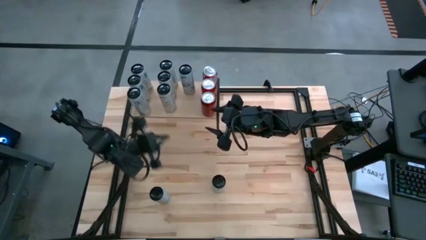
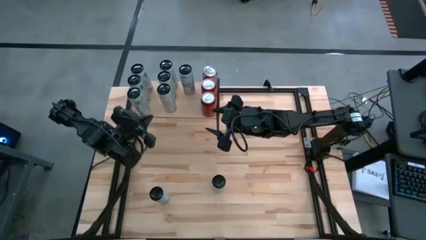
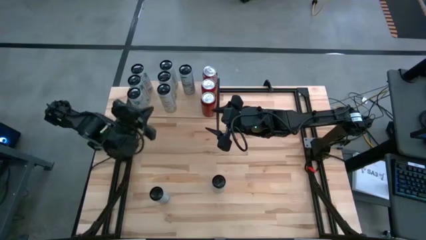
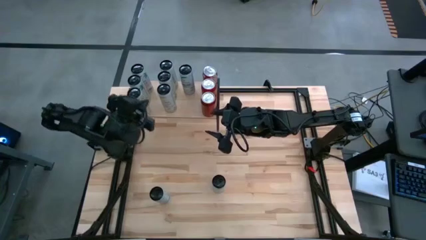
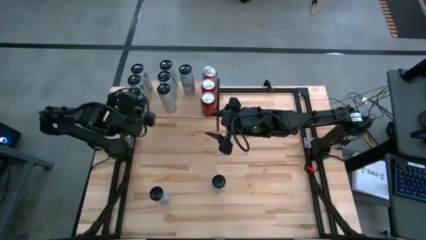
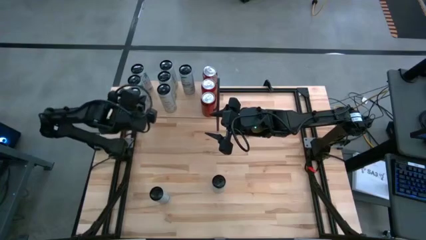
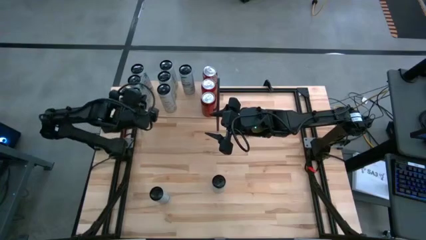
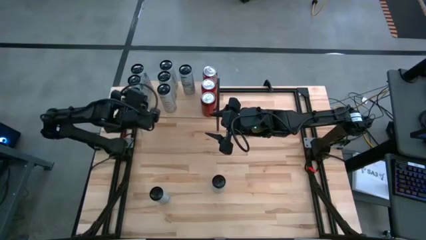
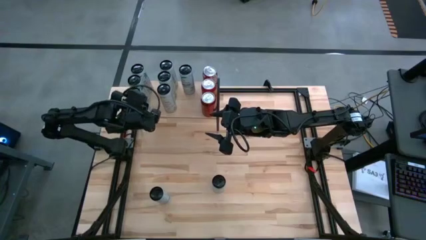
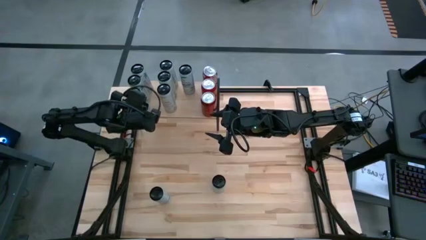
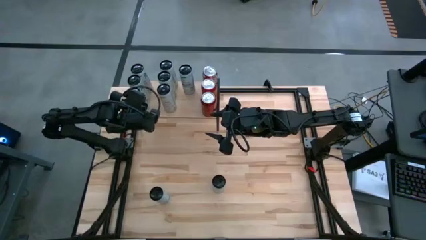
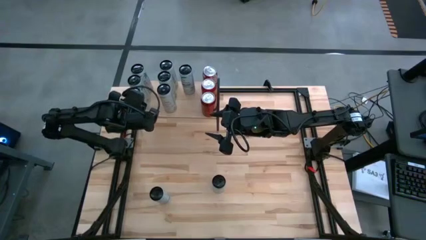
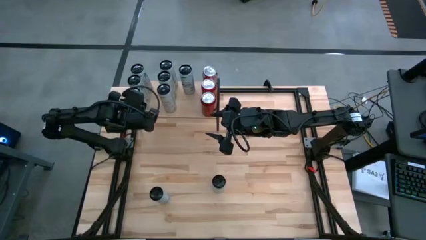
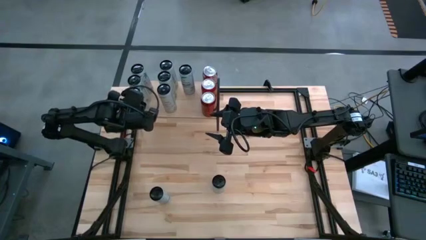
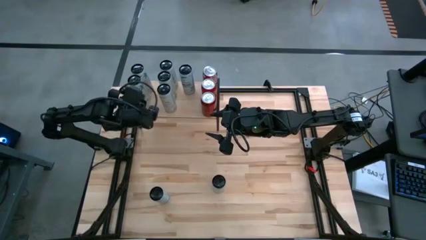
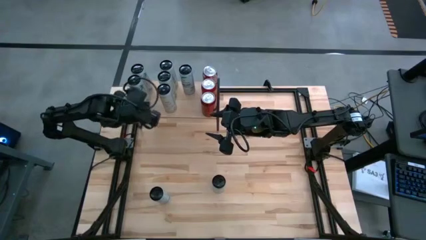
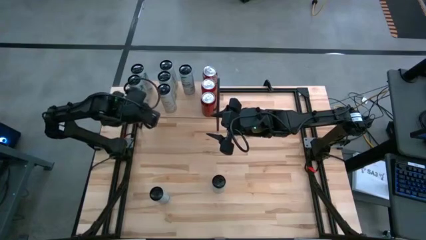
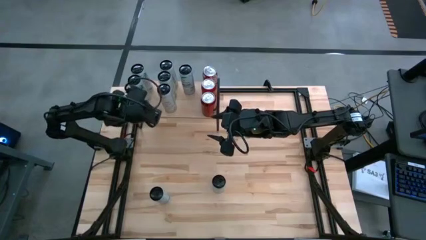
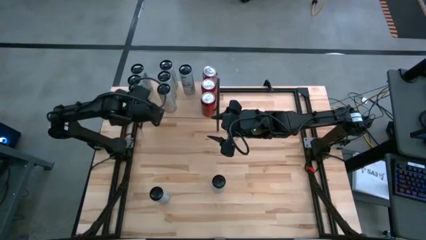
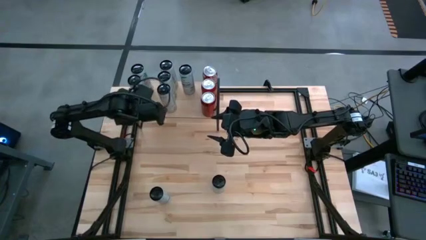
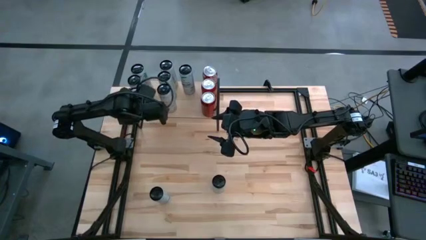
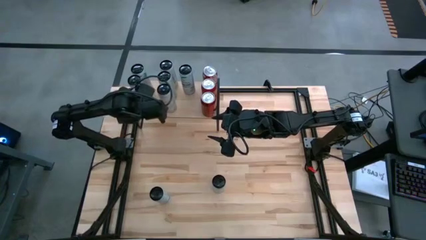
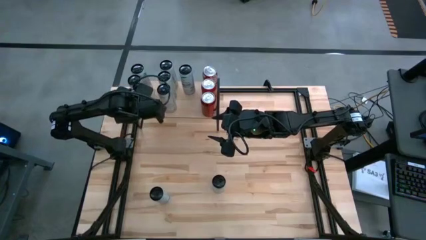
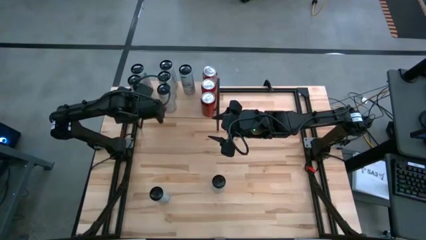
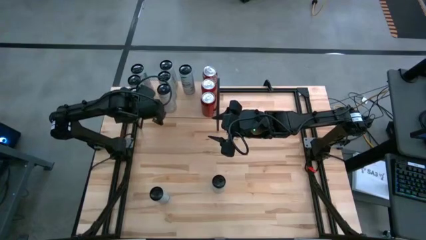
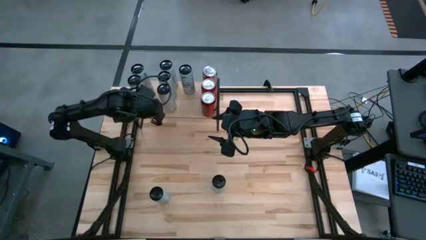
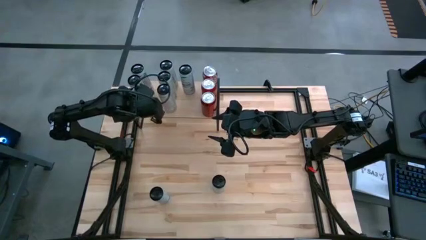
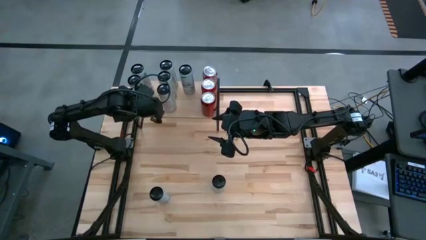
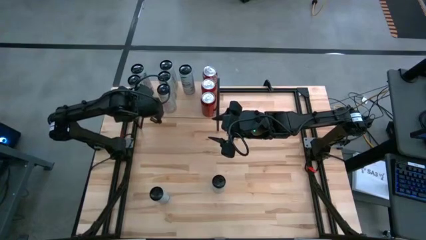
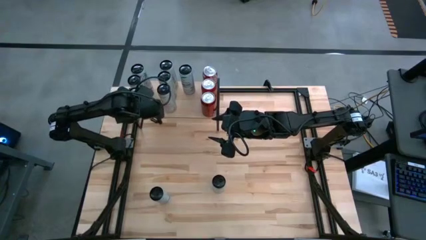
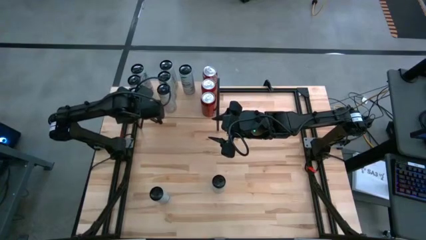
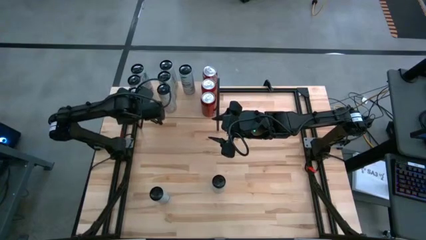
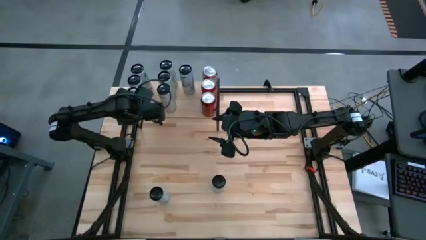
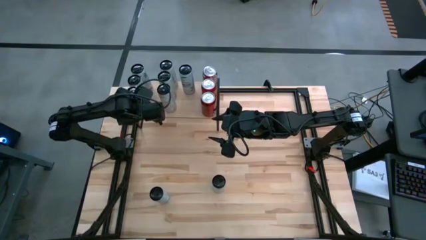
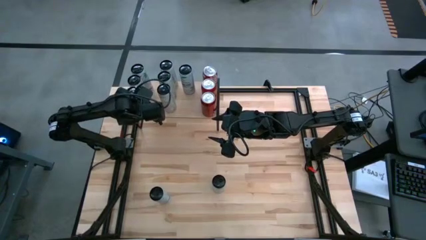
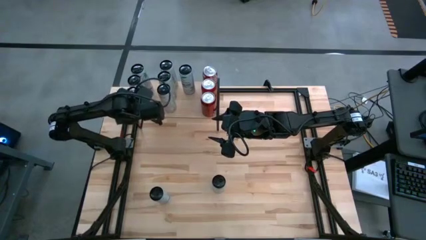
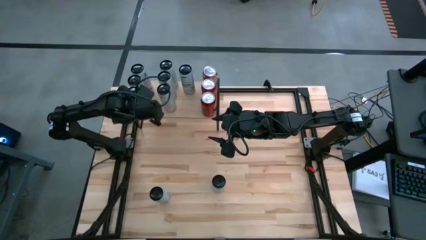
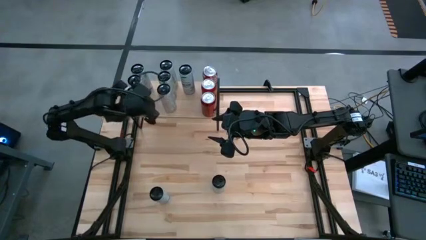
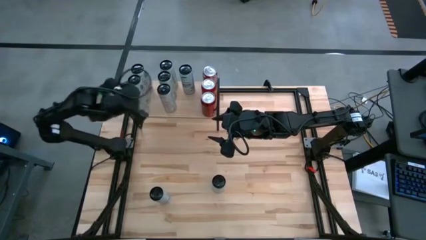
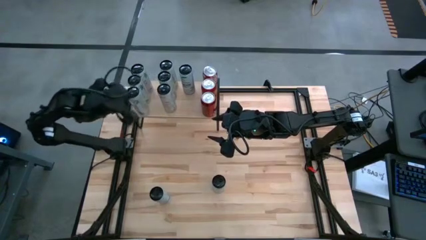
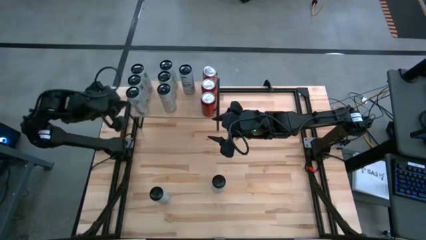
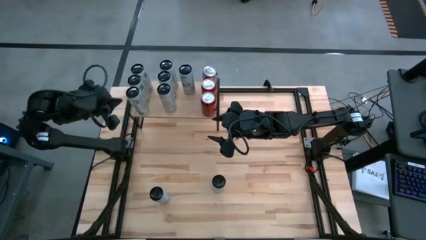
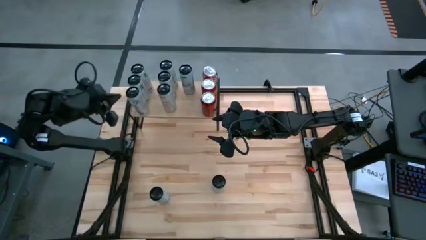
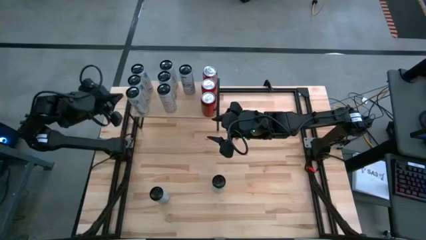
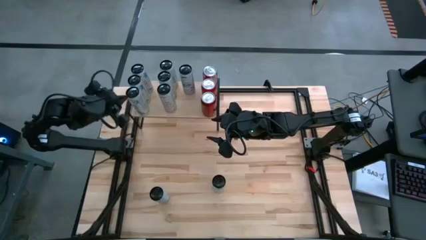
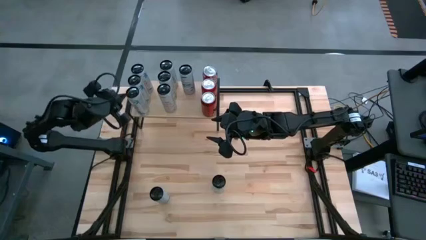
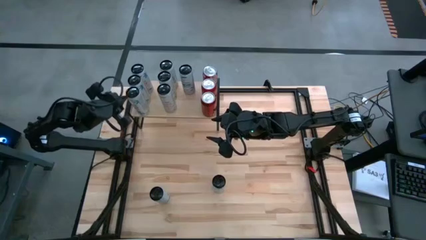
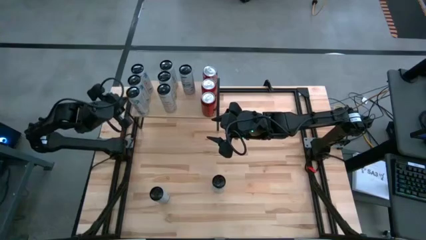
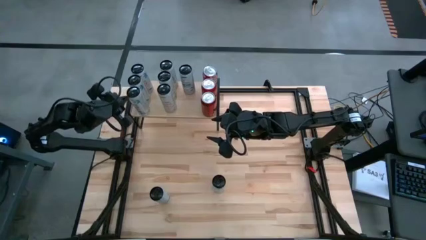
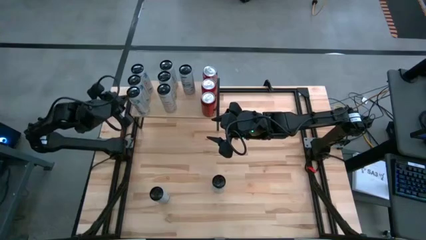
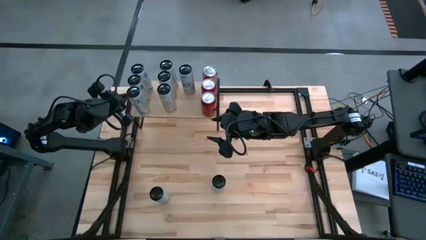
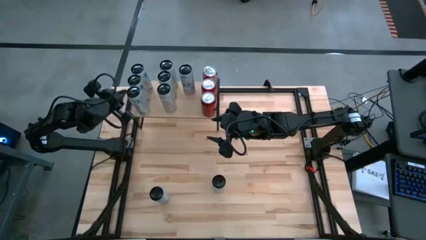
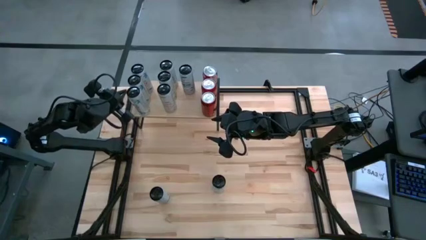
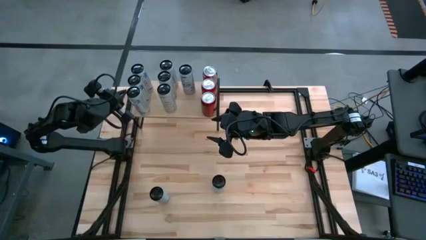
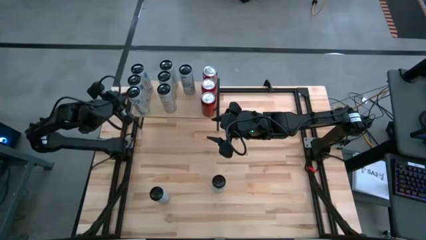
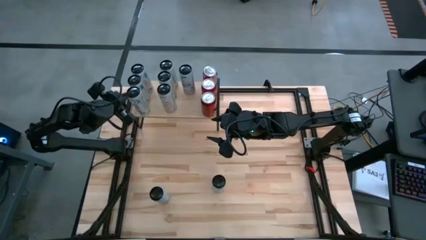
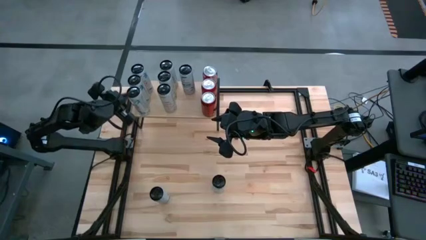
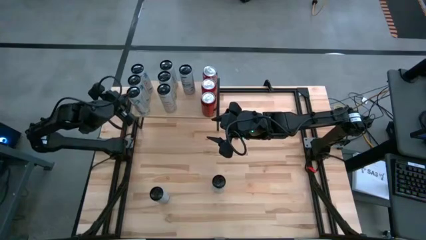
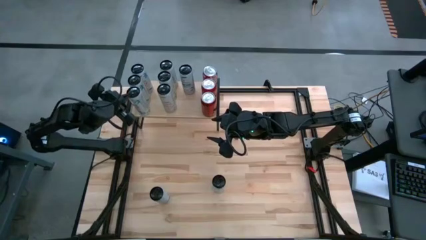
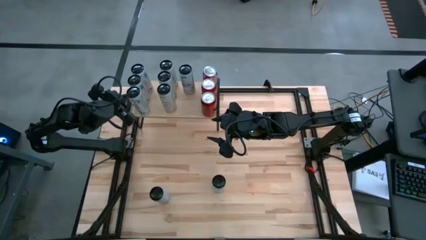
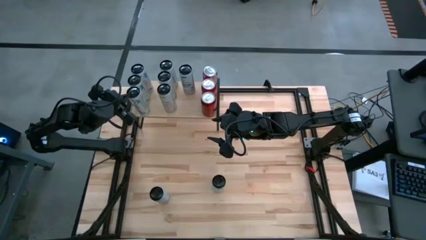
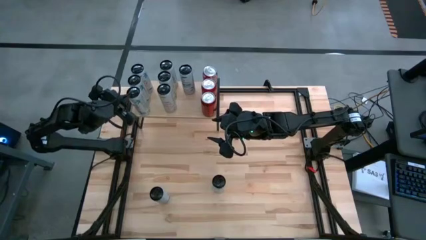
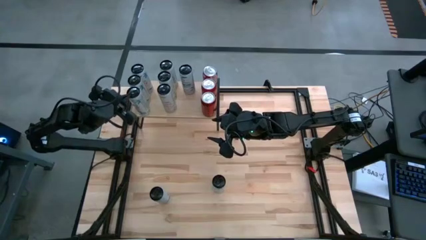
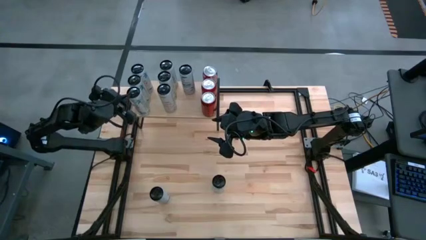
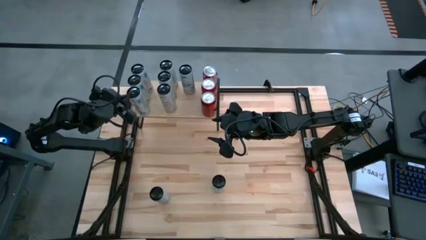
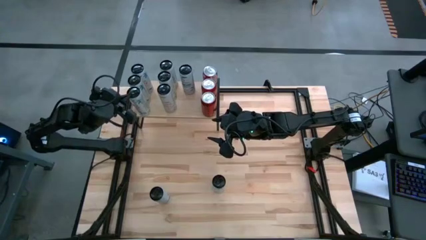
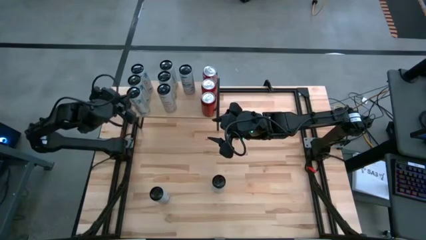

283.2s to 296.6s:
Task: Place canned beverage on shelf
Put the white pink soda can on the shelf aligned with the other white pink soda cans
